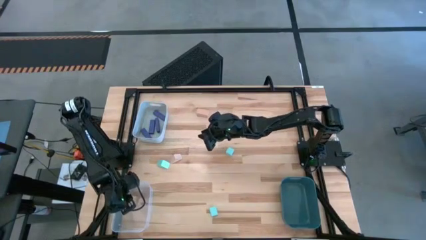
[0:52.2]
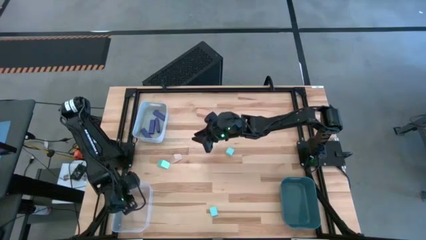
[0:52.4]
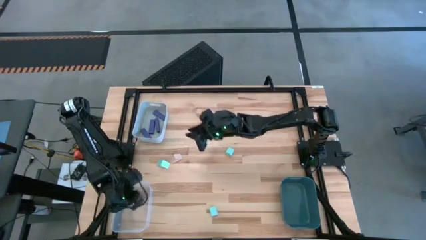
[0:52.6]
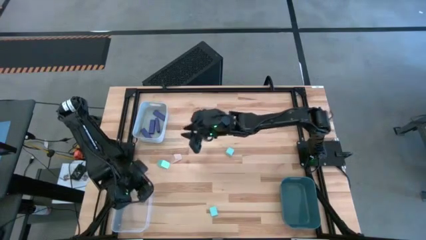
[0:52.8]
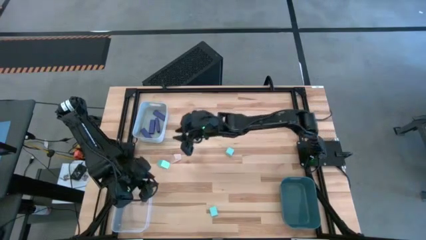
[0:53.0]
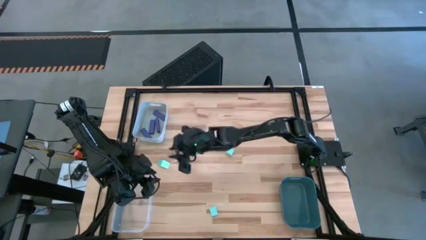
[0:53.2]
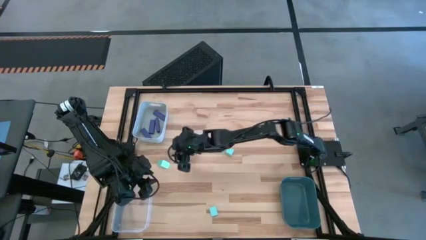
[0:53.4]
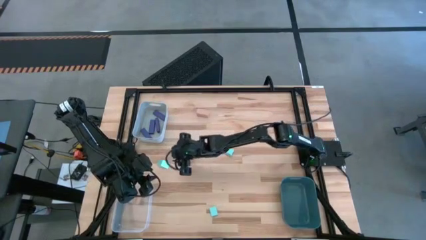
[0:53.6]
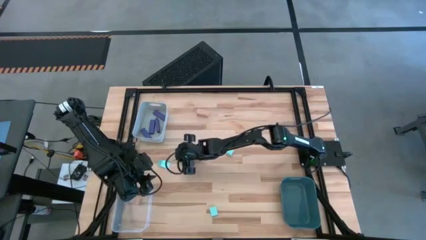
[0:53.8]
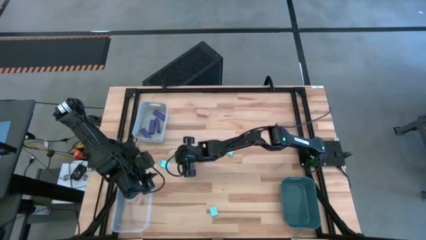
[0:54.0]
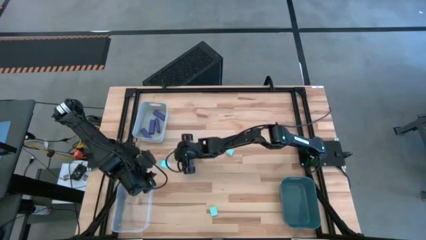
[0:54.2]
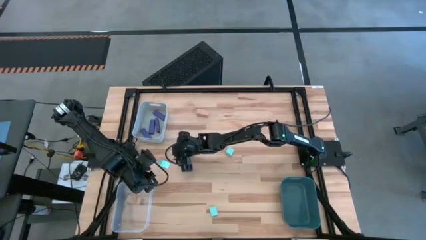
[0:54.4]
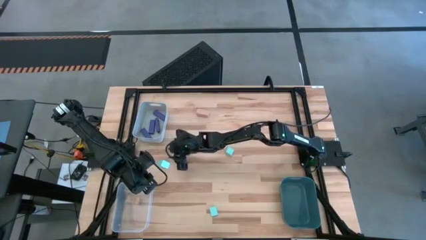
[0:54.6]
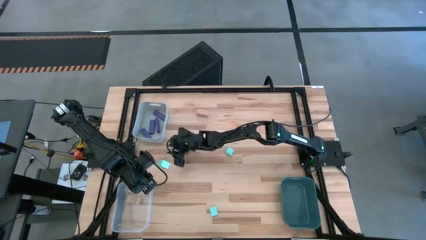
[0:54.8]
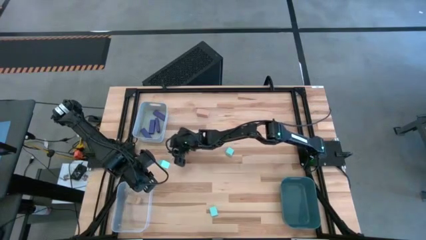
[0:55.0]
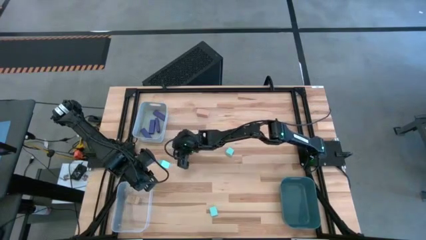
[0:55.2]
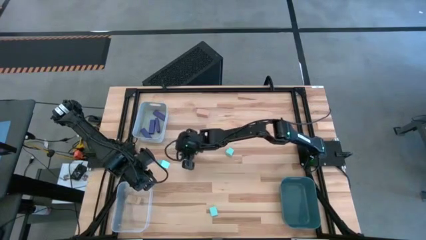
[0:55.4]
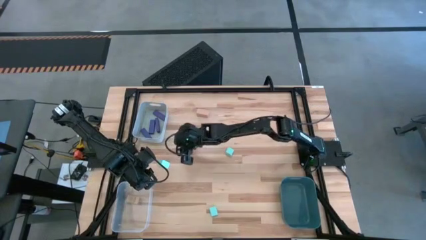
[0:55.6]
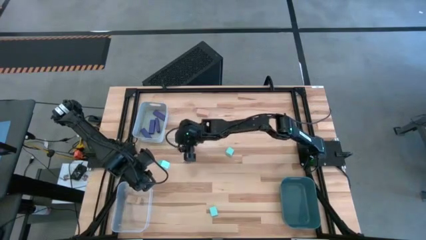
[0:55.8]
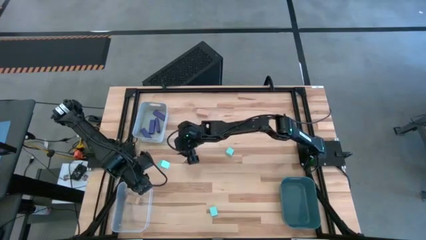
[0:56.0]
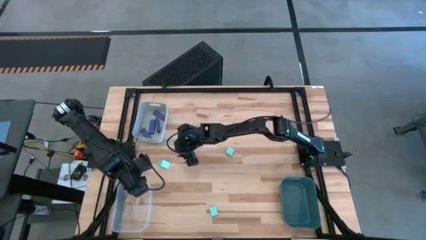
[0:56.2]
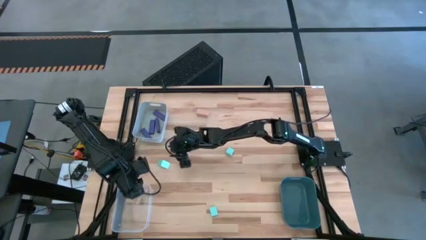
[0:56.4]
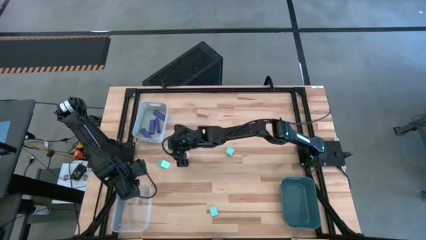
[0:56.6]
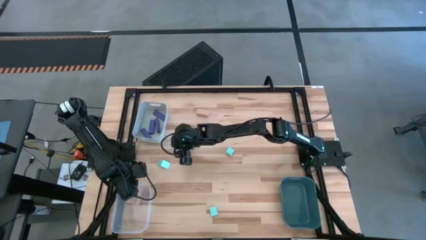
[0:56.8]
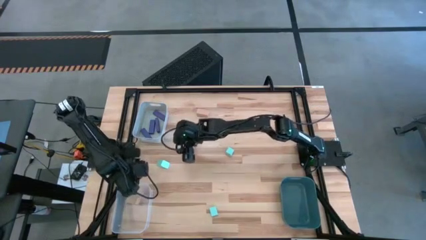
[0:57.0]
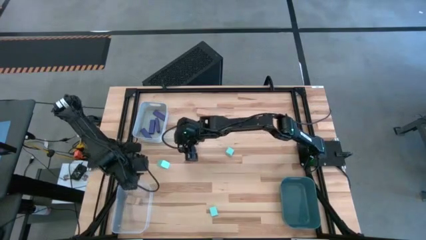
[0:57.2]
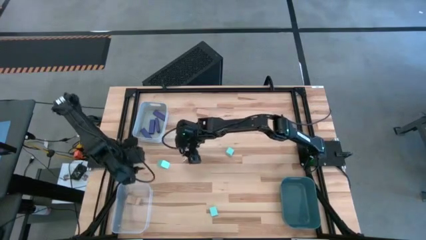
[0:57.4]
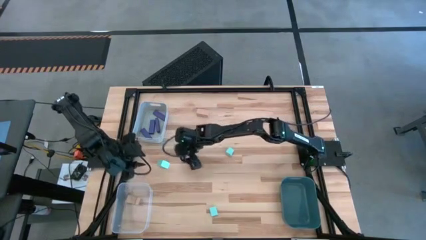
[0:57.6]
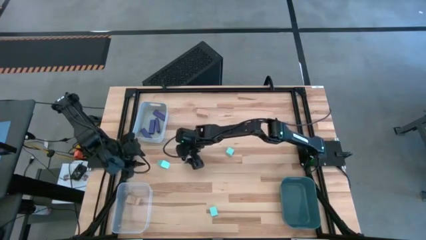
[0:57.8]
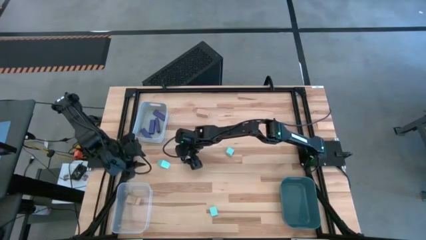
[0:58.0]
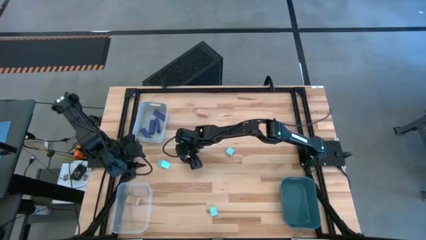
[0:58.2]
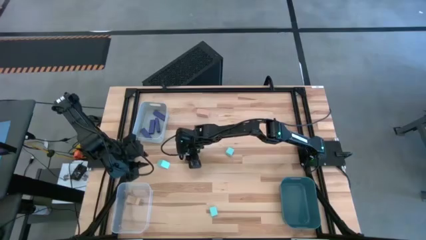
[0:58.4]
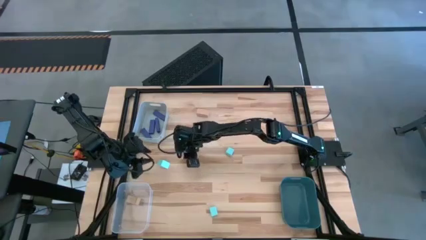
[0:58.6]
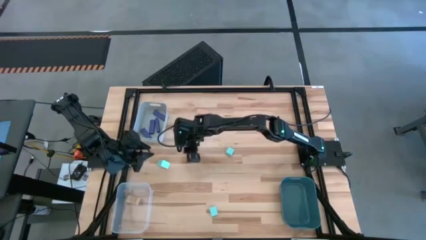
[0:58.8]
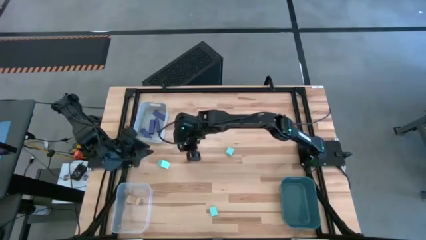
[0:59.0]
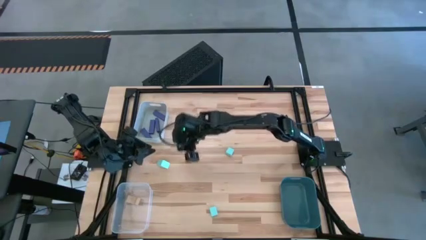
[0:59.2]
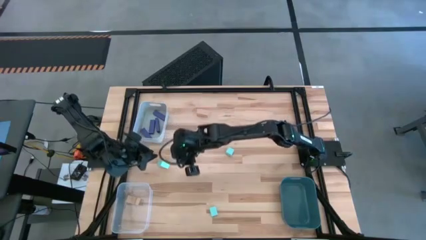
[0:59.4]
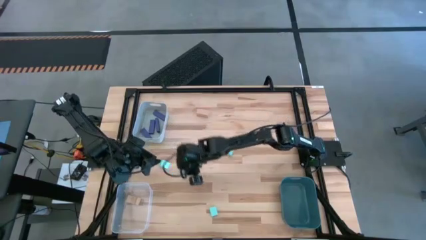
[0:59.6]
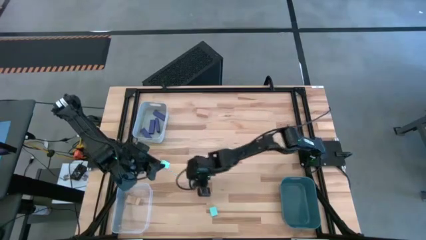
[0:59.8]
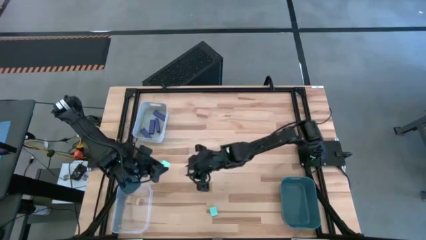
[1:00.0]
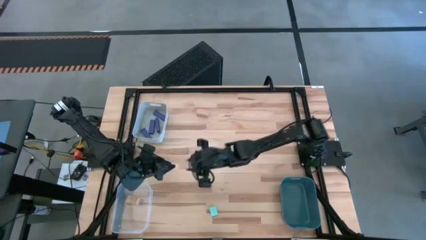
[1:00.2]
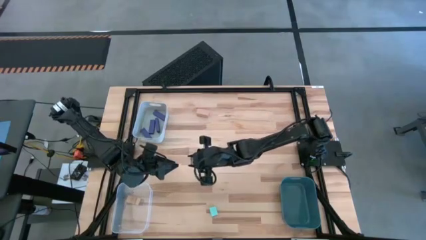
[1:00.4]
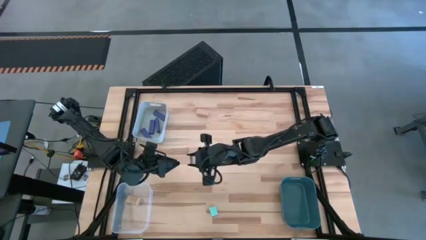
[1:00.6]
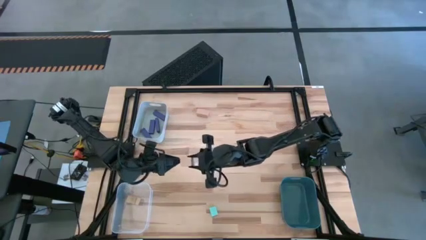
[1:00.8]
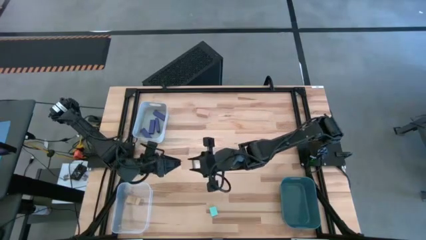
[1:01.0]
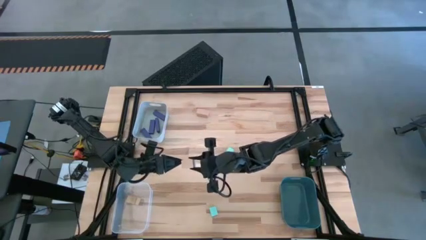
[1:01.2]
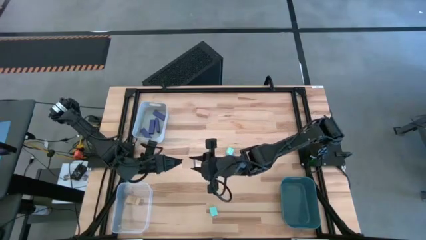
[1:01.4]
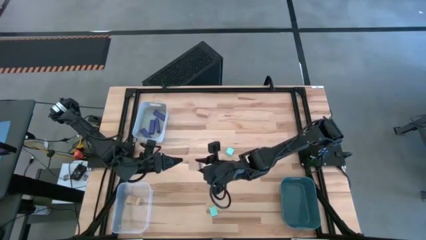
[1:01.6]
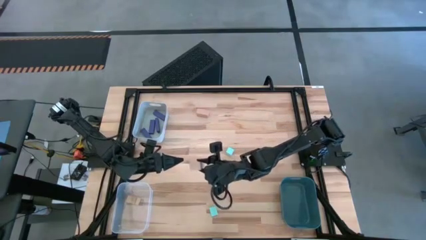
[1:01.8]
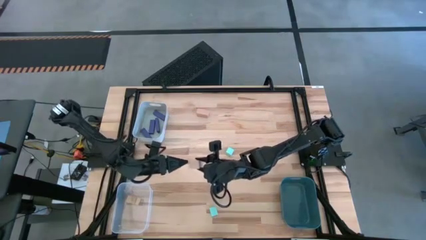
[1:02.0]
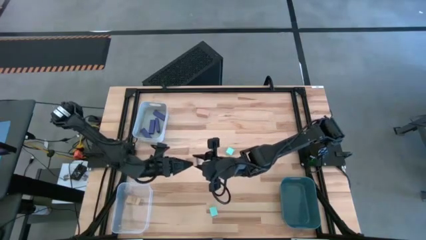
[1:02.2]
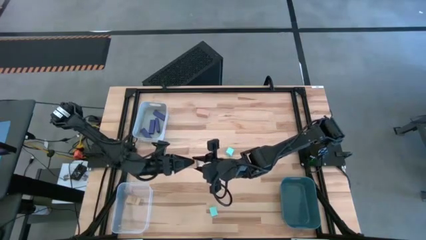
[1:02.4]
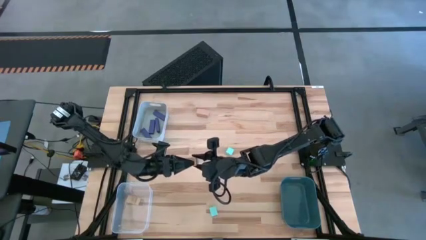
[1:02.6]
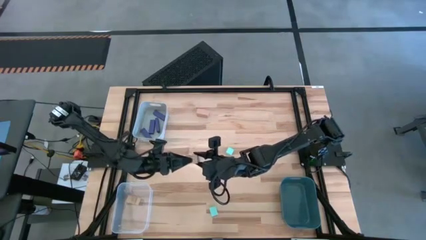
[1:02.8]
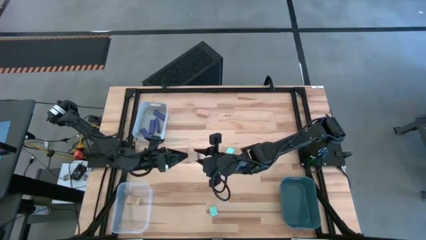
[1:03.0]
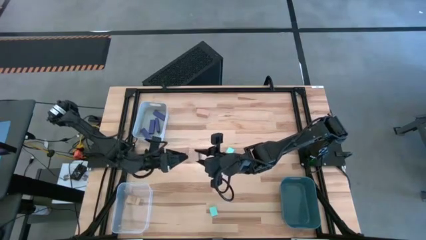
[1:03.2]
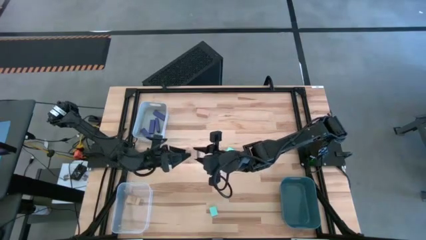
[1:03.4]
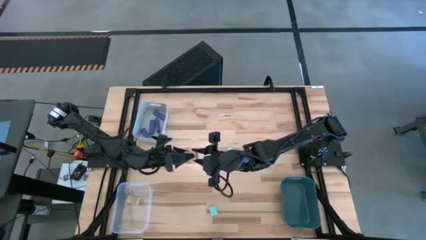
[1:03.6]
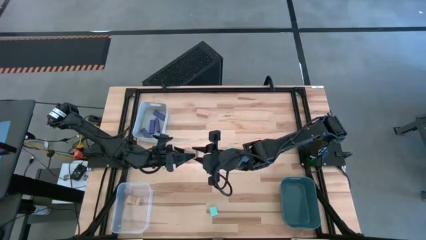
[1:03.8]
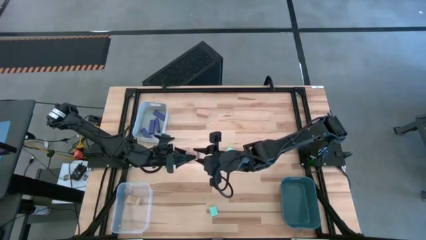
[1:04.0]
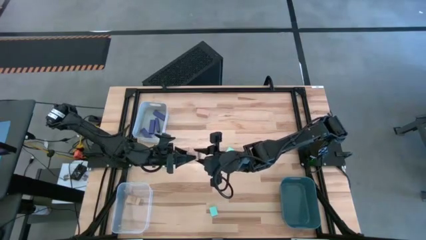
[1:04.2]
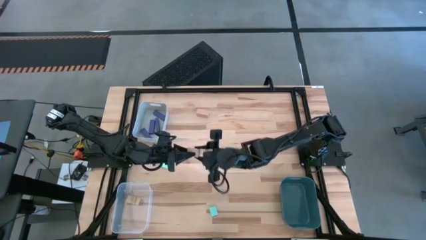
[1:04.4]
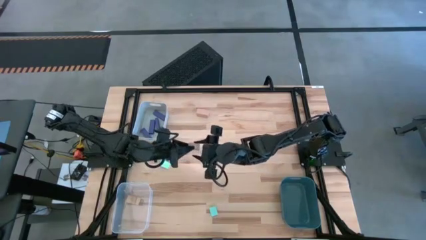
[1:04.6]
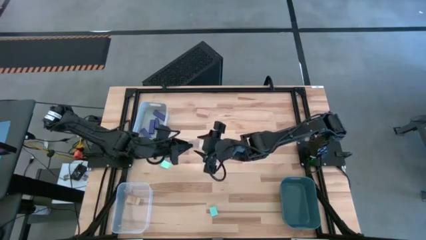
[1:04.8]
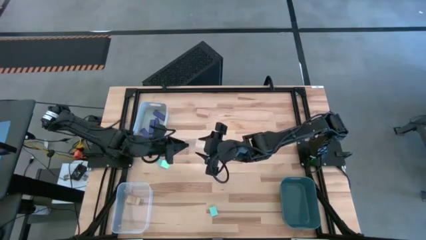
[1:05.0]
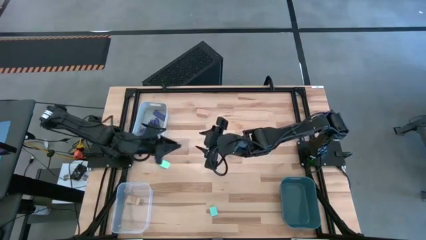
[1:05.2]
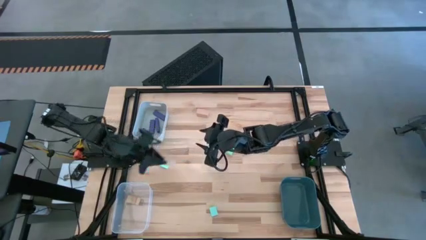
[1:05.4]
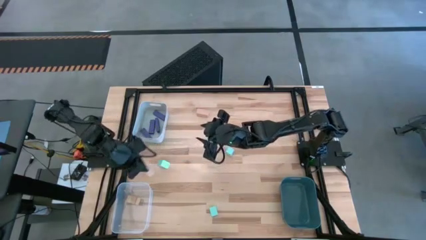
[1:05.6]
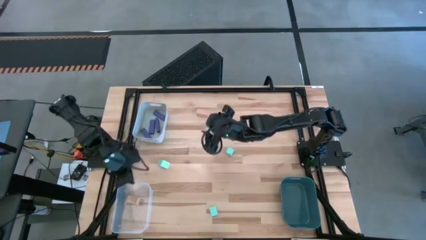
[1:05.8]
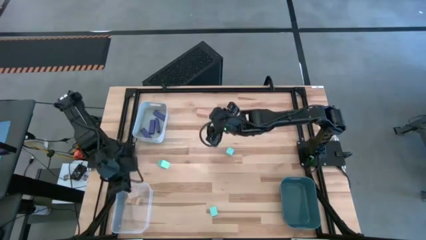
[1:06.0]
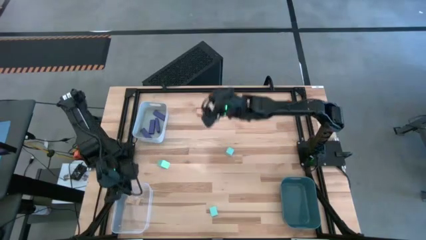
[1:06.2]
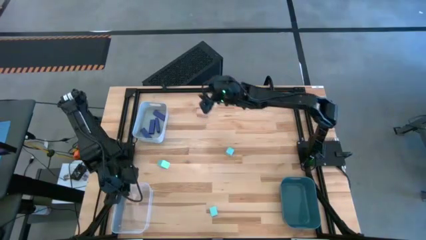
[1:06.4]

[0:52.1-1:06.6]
Task: Sort & place blocks by color
Put the brown block into the transparent bin

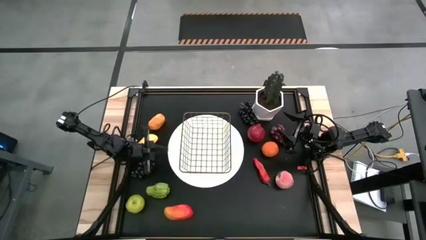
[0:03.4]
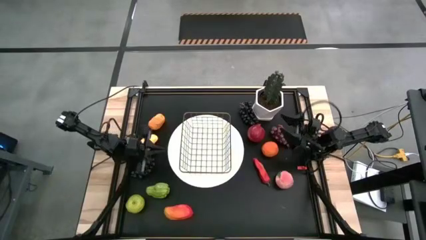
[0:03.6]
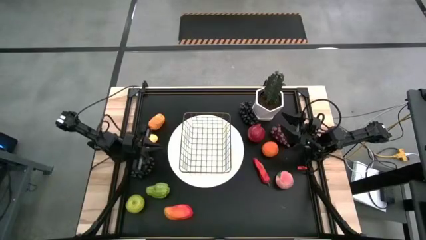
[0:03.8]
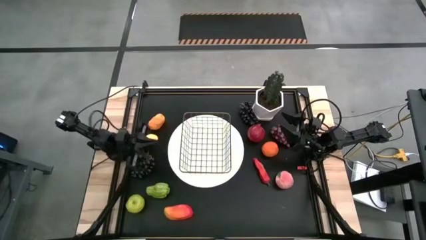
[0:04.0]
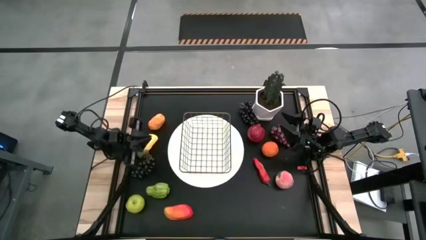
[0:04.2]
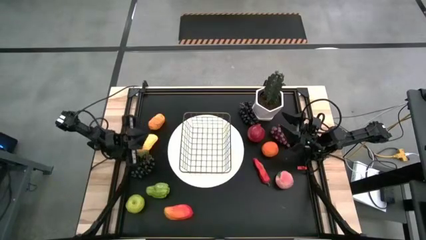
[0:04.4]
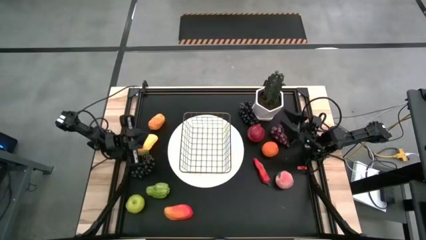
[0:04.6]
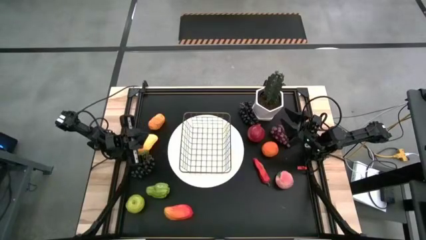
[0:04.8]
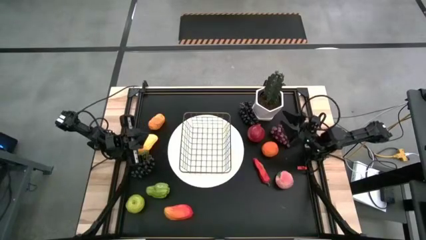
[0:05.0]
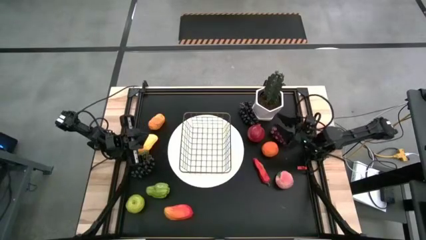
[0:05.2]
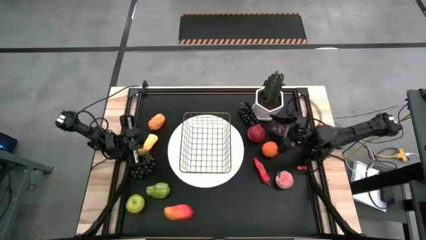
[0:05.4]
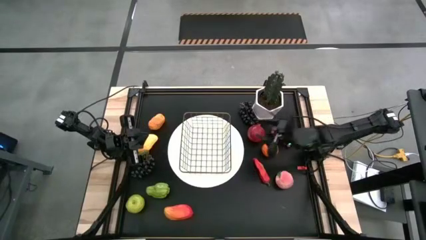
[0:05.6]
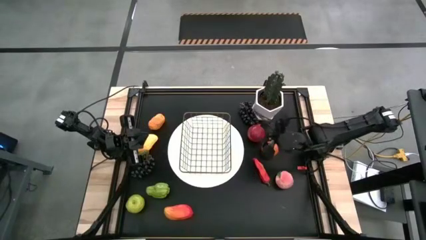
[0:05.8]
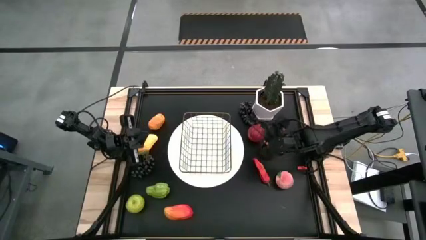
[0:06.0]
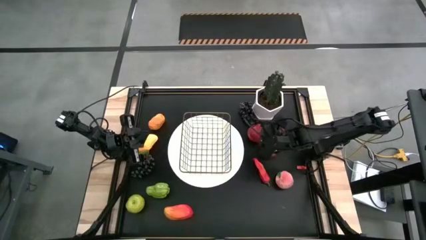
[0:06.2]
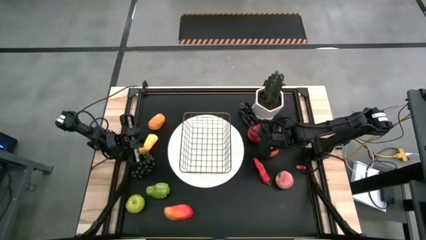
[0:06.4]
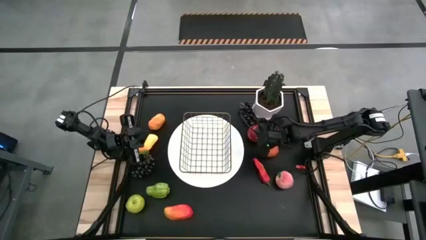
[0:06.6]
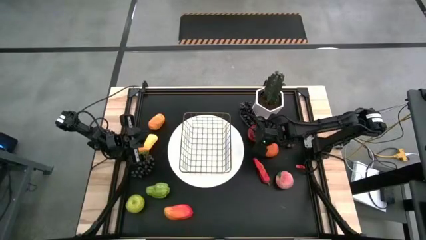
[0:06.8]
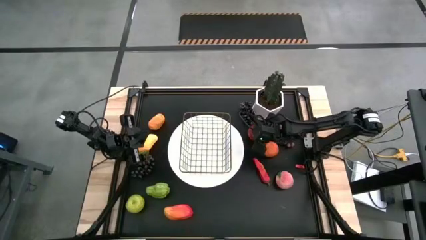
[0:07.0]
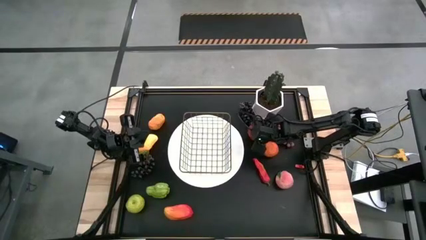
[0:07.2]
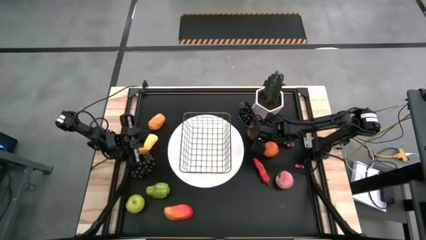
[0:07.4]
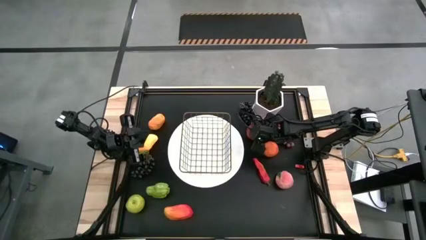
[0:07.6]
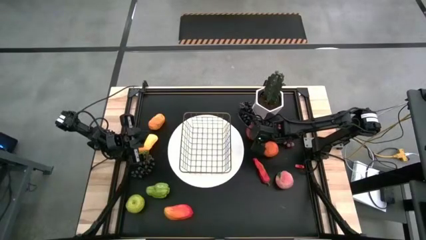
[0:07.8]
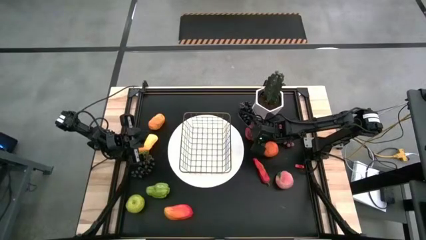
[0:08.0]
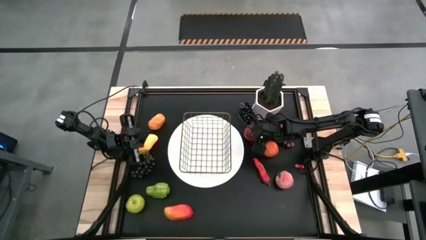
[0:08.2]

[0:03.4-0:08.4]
Task: Build produce basket
Put the pomegranate into the wire basket
